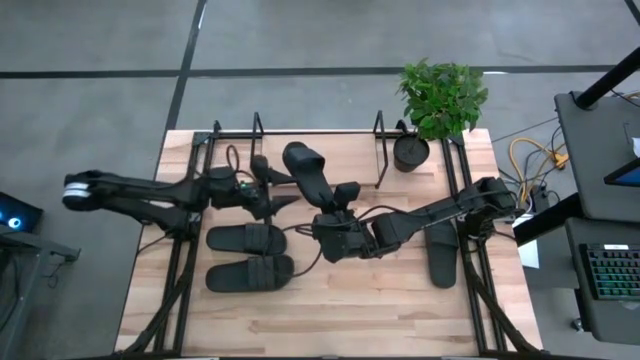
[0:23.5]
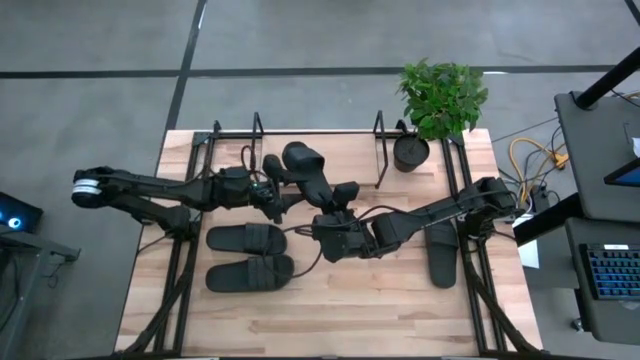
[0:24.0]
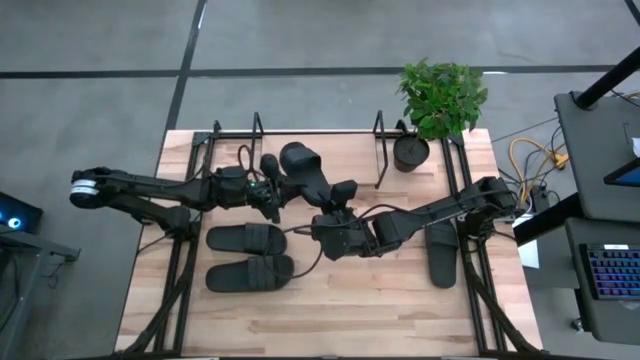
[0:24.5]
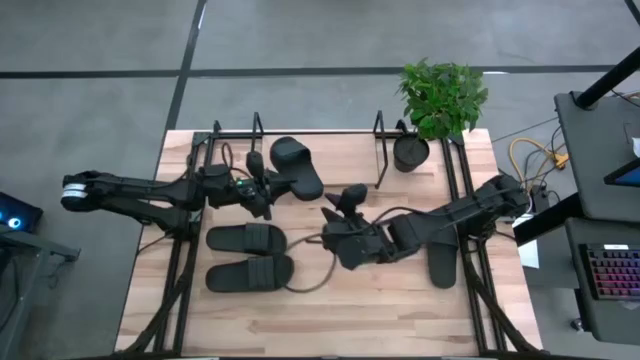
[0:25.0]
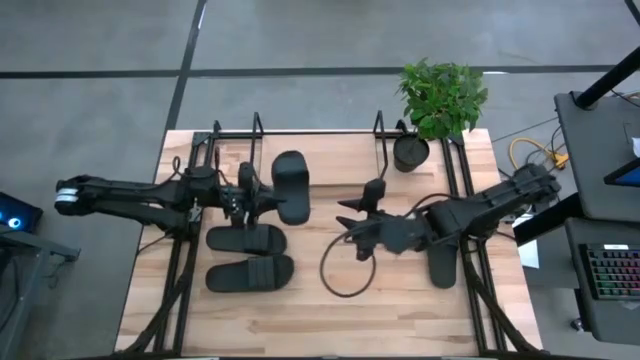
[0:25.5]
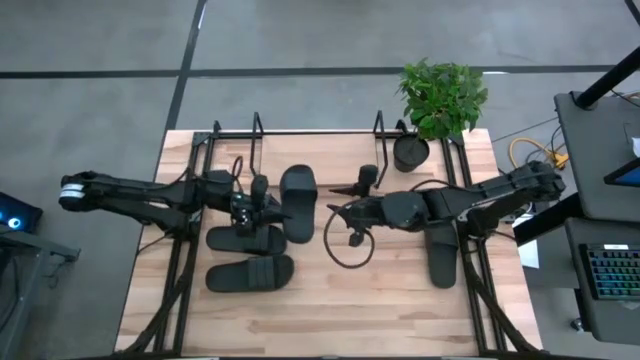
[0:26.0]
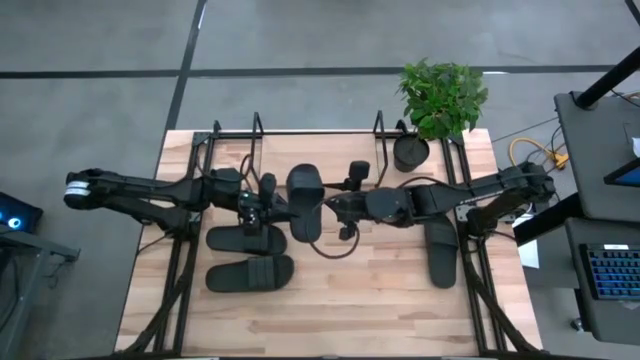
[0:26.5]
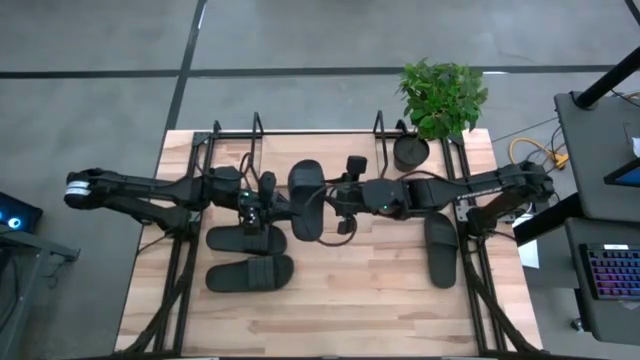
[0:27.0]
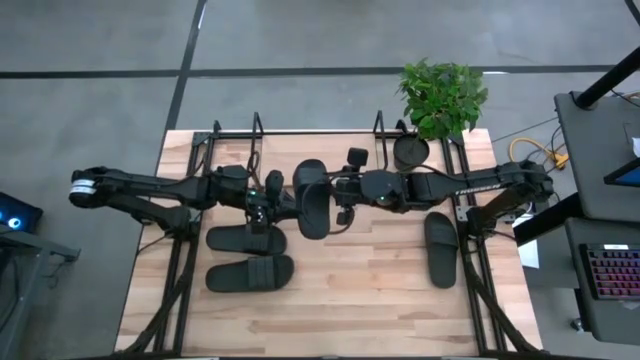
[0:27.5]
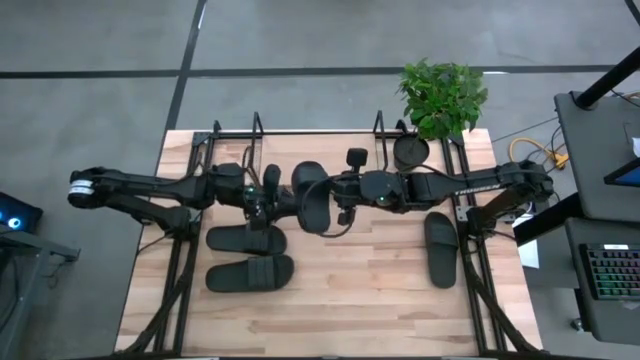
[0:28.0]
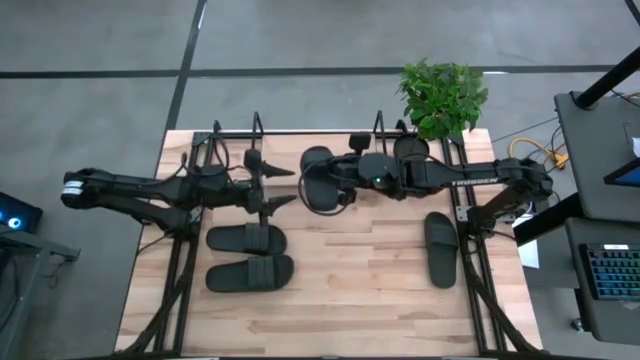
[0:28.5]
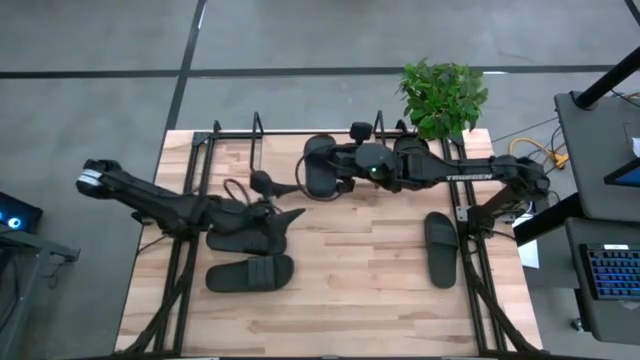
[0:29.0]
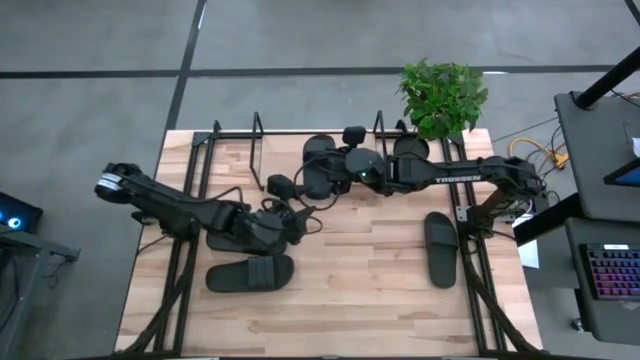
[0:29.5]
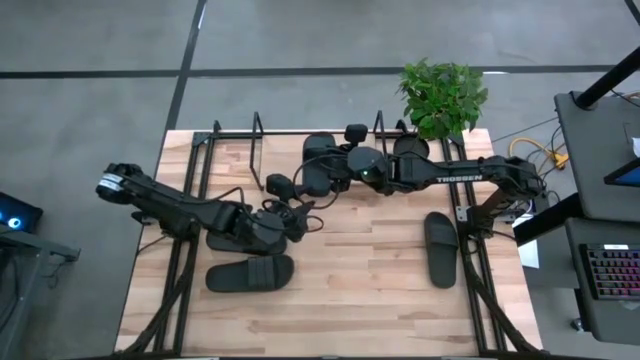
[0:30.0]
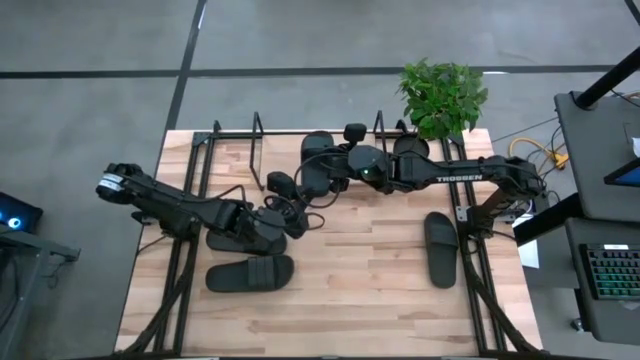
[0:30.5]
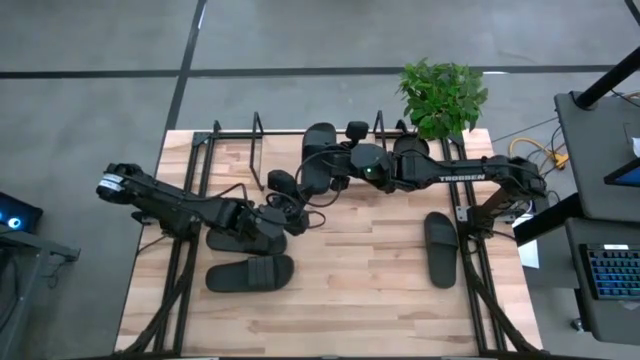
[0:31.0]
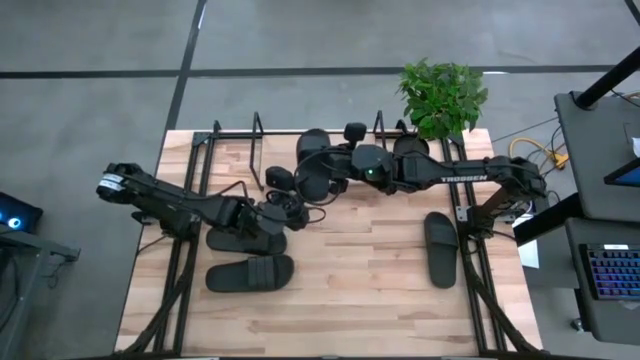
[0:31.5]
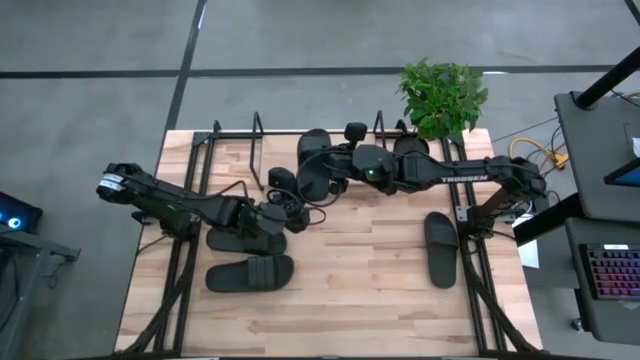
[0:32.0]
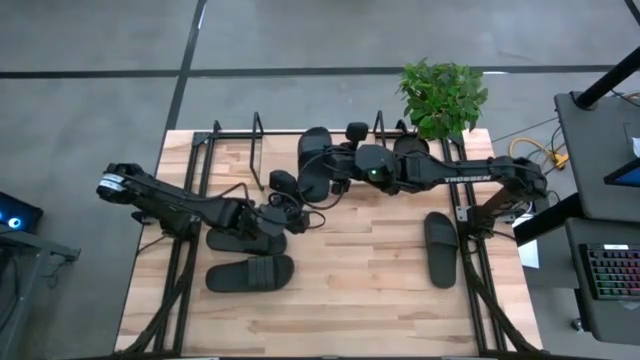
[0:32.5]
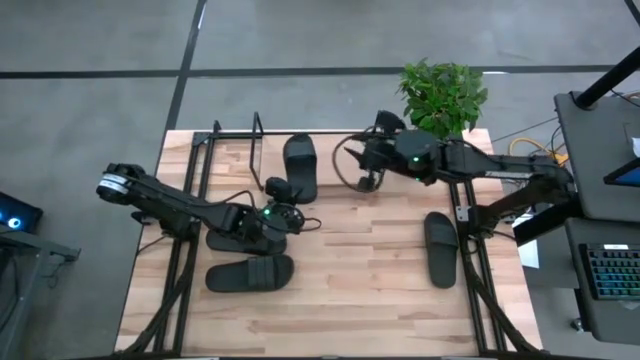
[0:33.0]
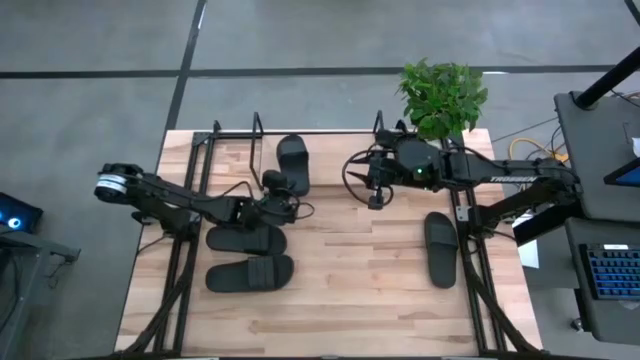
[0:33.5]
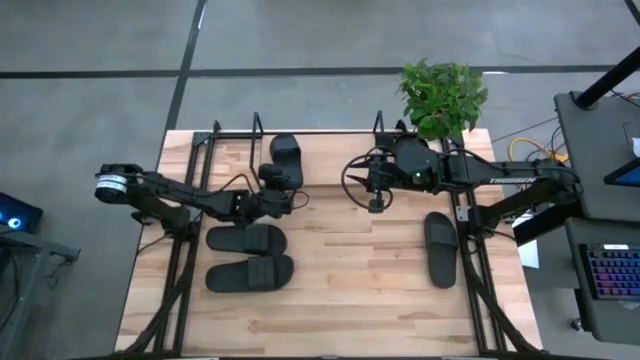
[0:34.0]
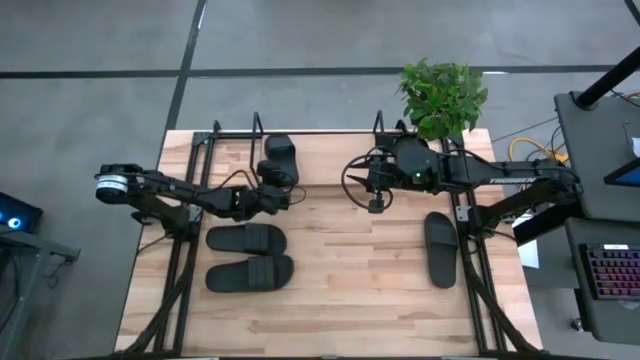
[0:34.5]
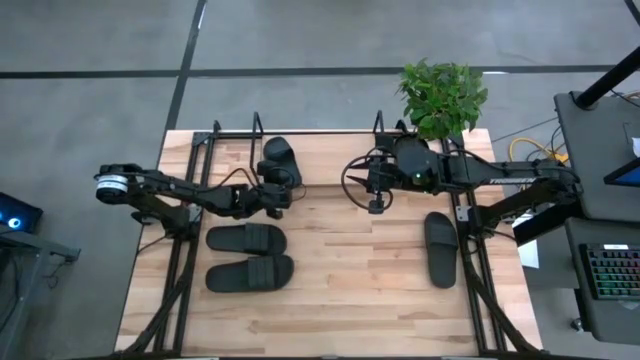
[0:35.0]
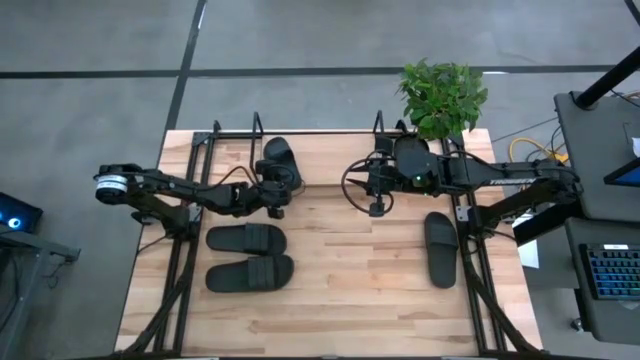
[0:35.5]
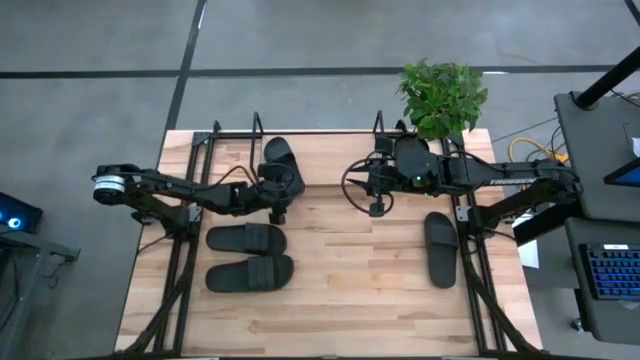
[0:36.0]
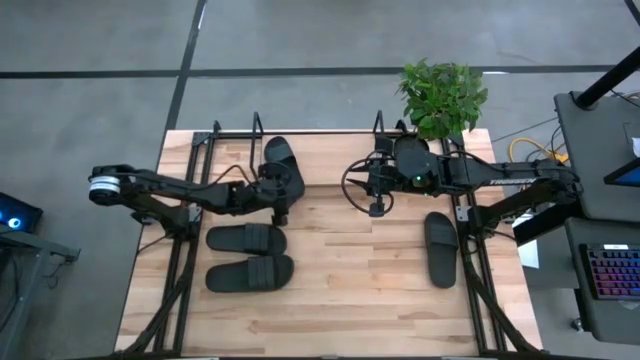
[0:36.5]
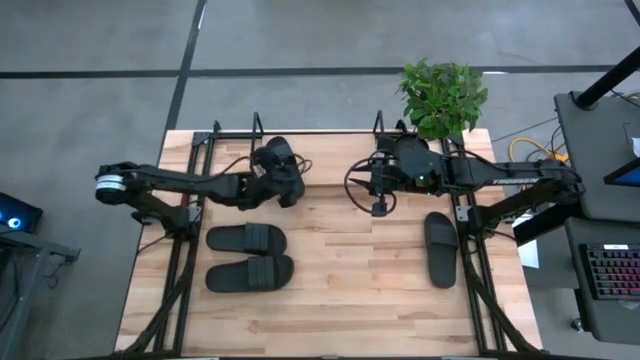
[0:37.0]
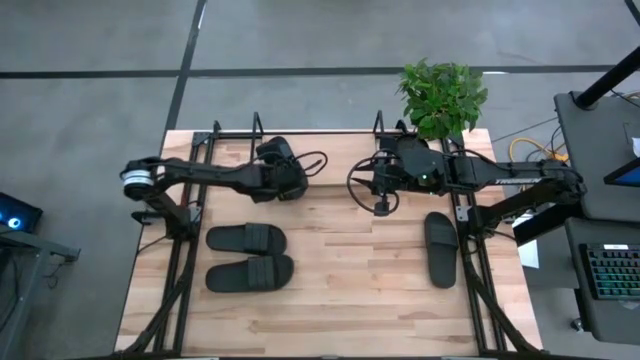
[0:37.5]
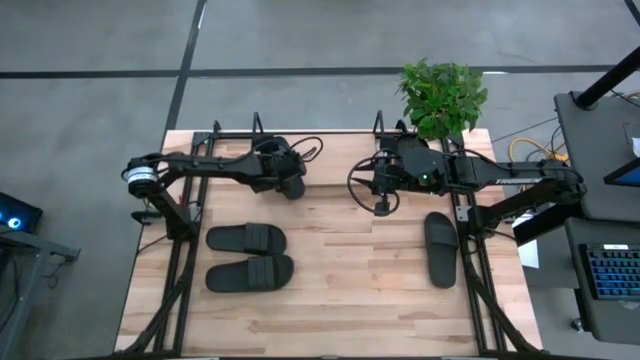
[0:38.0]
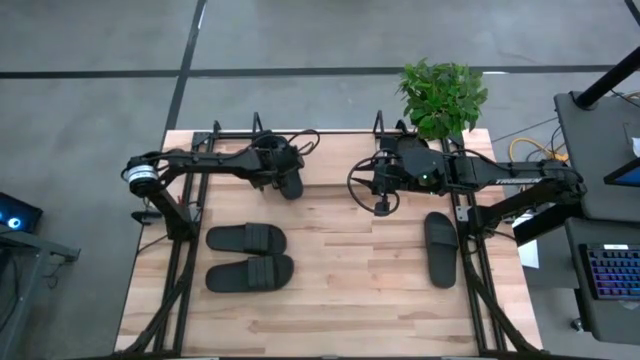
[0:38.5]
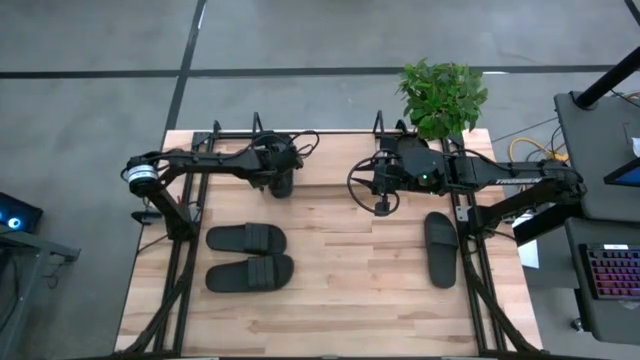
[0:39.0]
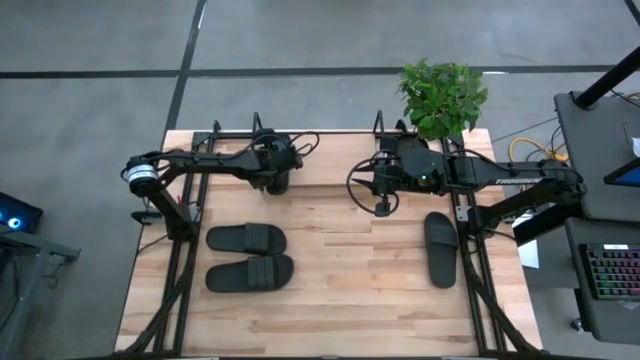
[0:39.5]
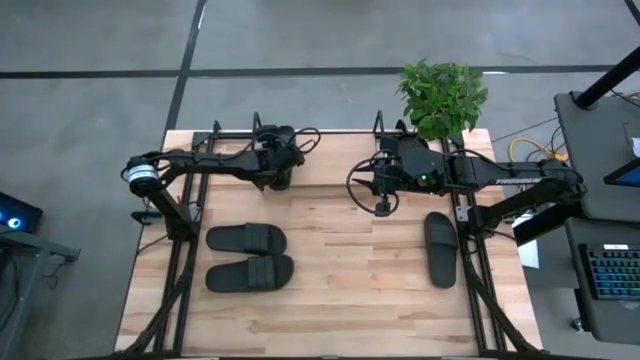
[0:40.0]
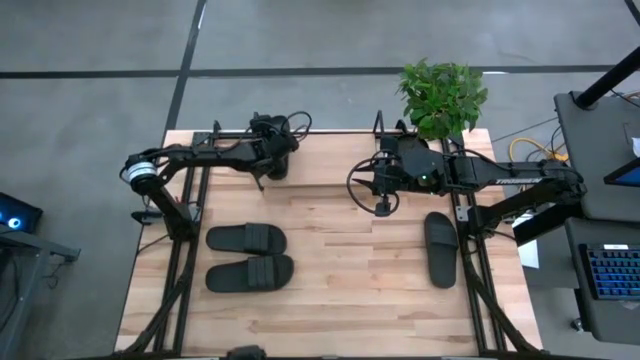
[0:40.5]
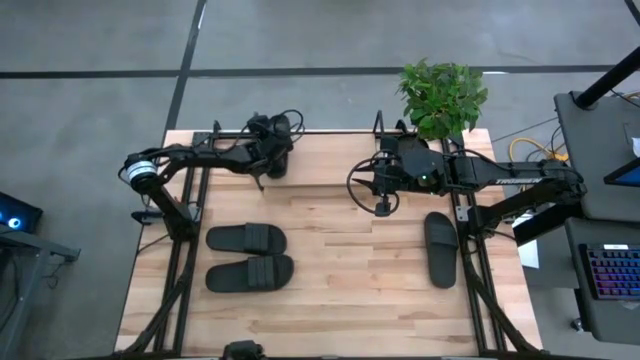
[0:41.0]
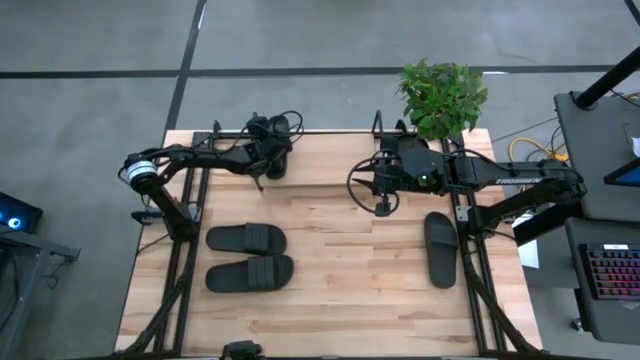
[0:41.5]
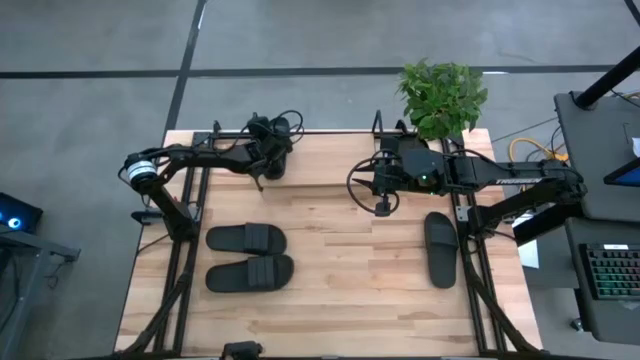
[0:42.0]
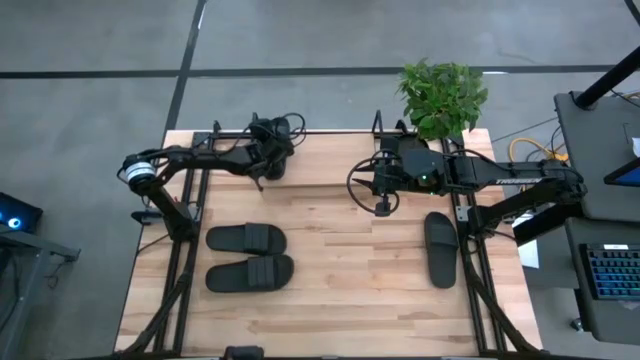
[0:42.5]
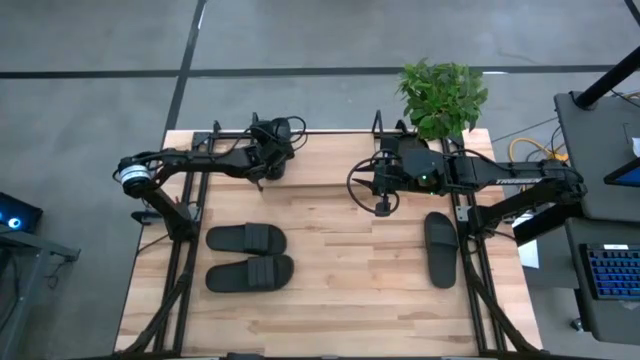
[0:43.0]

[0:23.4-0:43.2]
Task: Pick and place slides into the shelf
Put the black slide on the shelf
